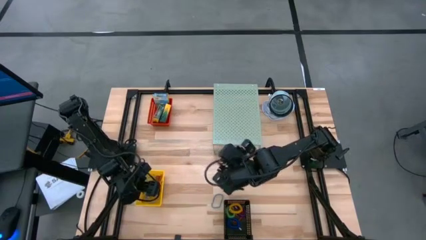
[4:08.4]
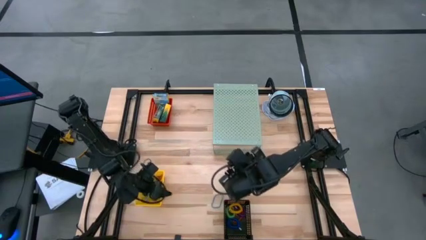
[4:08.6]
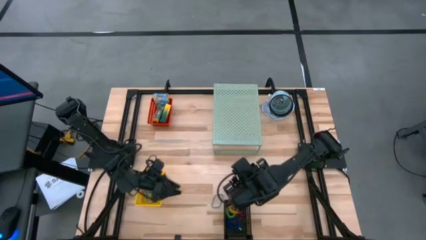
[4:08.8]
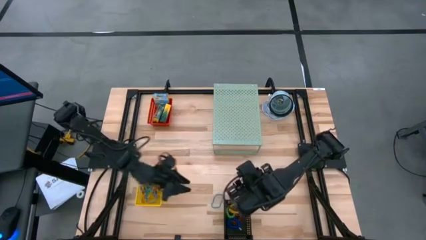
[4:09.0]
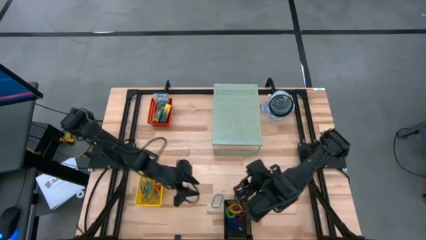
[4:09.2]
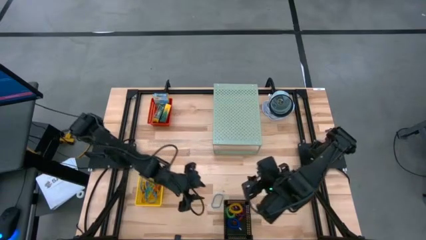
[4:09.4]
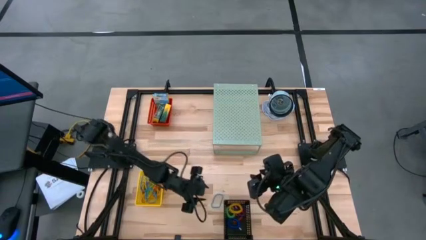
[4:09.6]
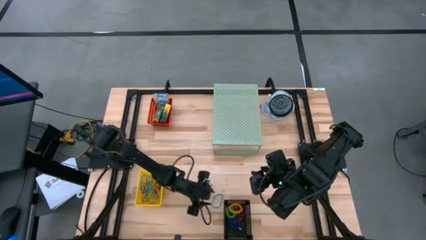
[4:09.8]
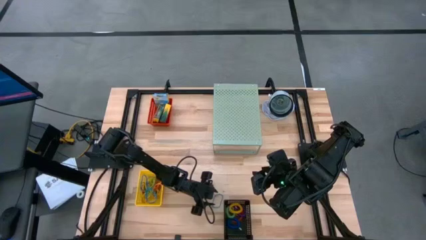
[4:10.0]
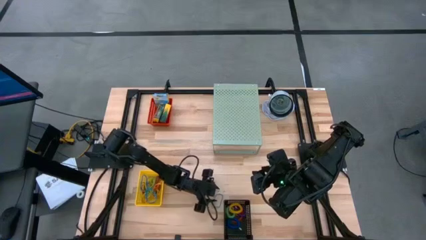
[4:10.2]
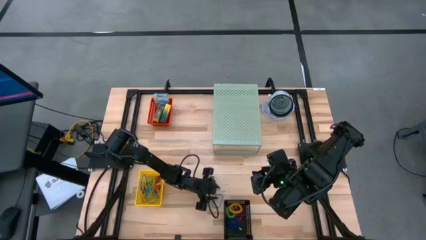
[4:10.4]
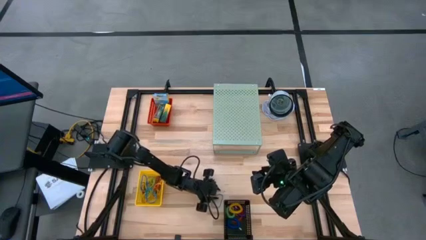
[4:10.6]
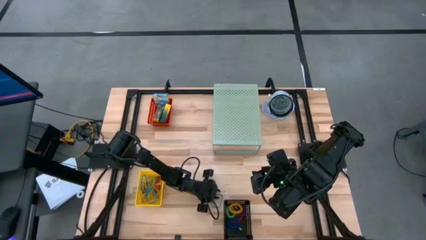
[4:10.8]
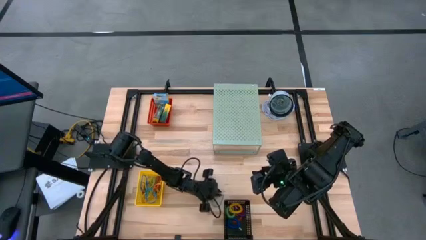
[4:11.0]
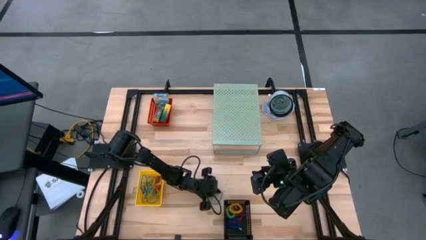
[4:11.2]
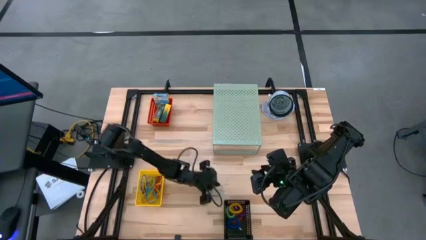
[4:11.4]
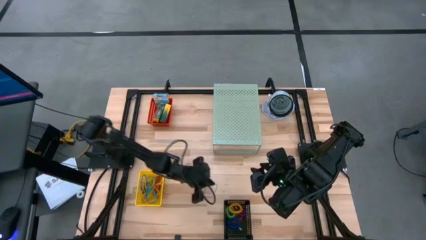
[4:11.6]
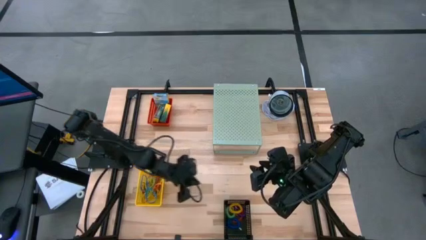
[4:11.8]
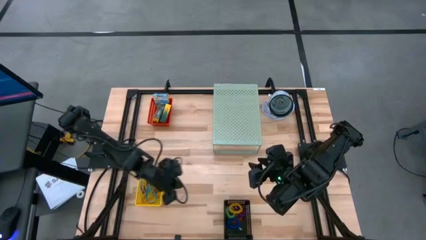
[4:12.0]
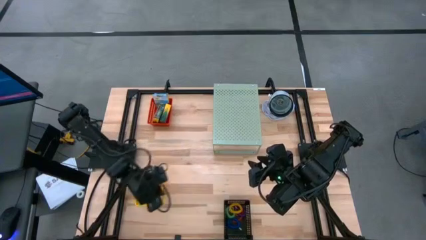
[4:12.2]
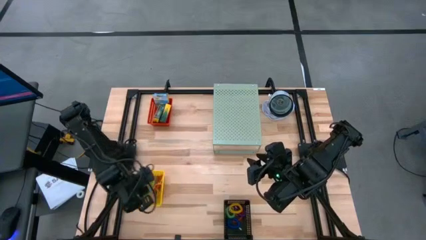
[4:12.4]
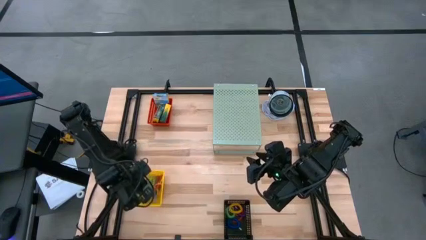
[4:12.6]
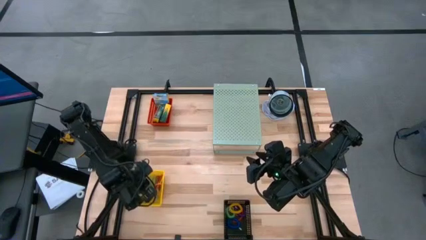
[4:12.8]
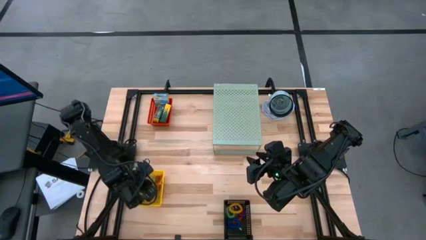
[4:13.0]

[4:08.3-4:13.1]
Task: Pick & Place Office Desk Supplies
Put the blue rubber band into the yellow bin

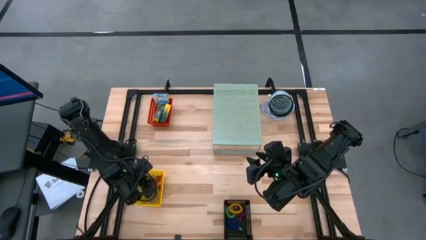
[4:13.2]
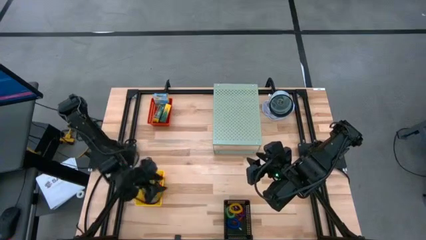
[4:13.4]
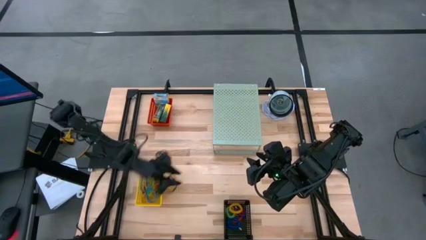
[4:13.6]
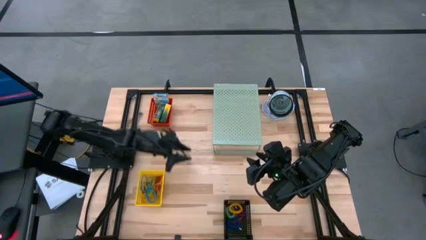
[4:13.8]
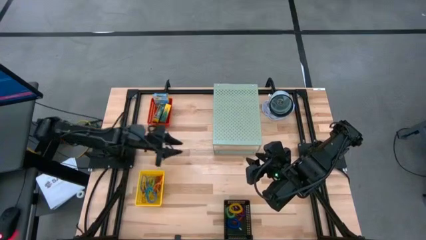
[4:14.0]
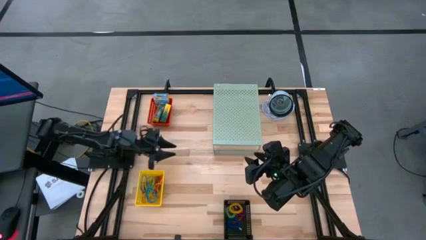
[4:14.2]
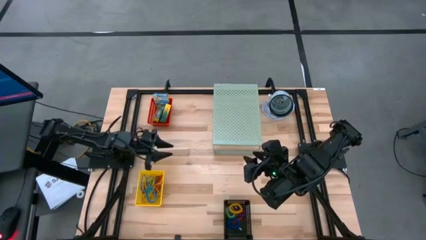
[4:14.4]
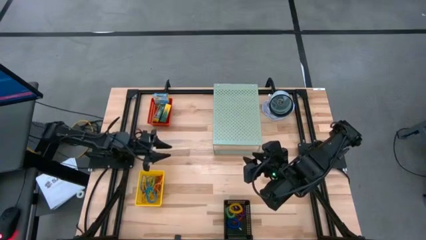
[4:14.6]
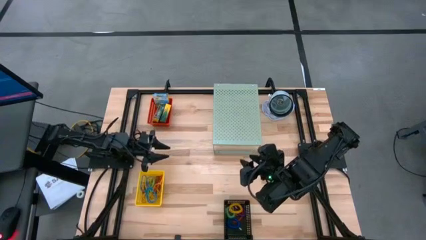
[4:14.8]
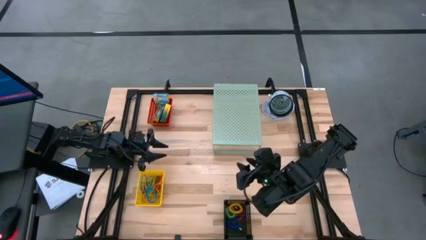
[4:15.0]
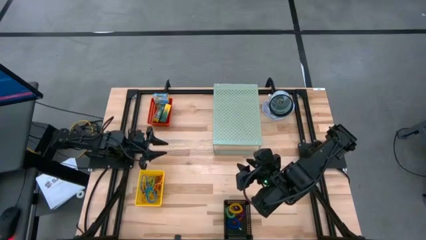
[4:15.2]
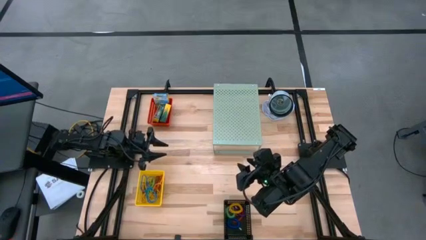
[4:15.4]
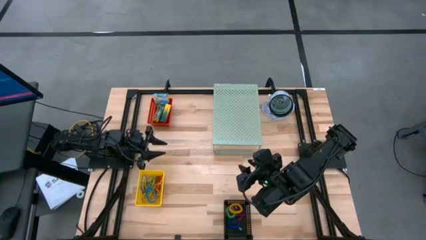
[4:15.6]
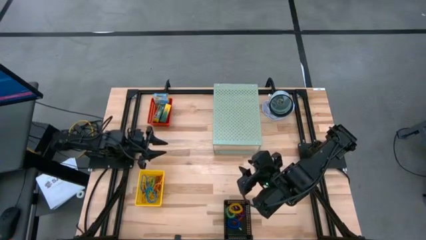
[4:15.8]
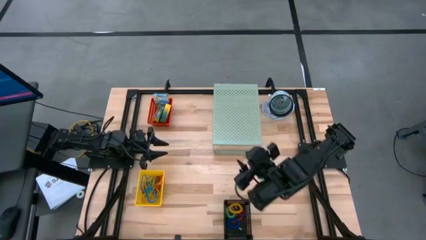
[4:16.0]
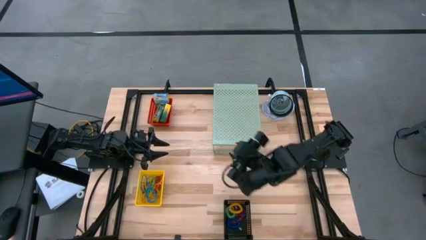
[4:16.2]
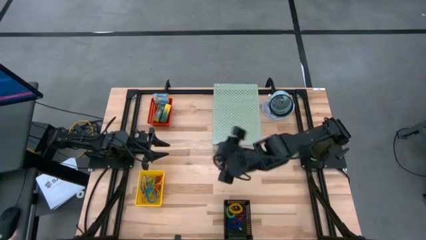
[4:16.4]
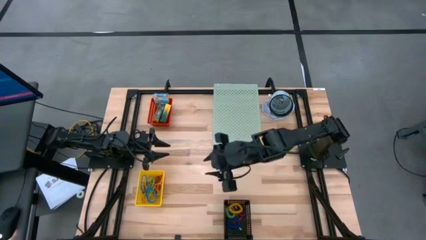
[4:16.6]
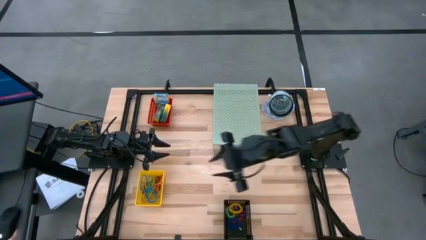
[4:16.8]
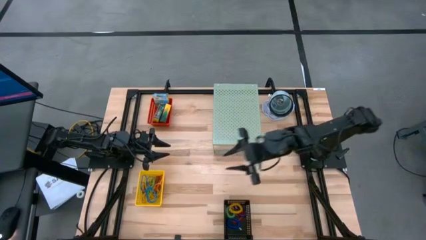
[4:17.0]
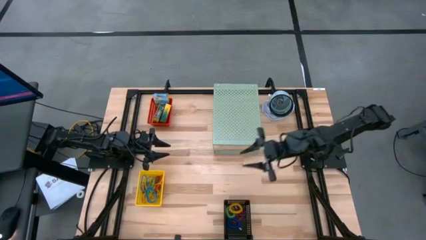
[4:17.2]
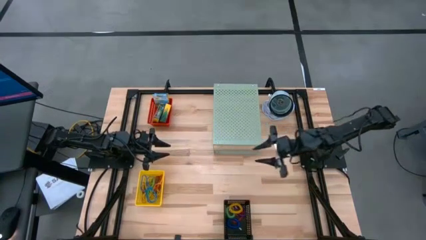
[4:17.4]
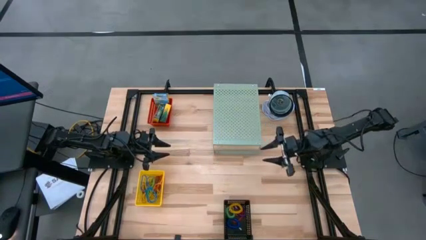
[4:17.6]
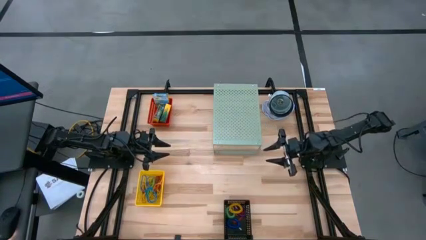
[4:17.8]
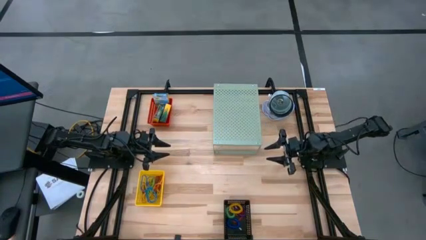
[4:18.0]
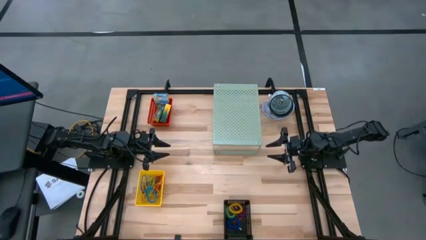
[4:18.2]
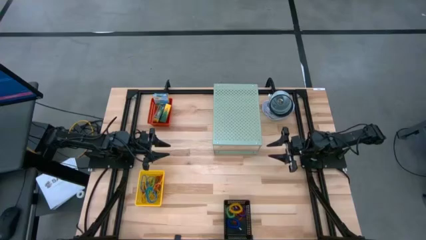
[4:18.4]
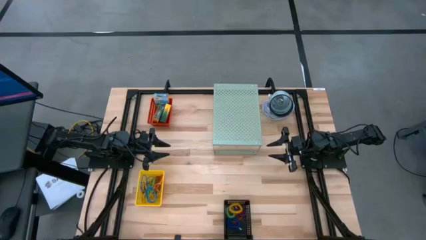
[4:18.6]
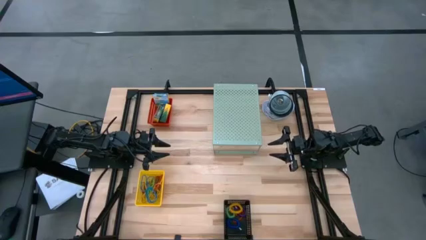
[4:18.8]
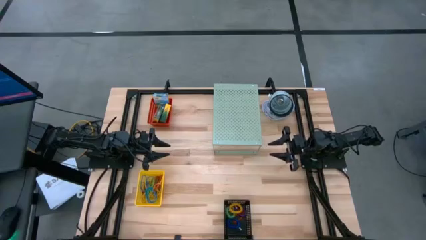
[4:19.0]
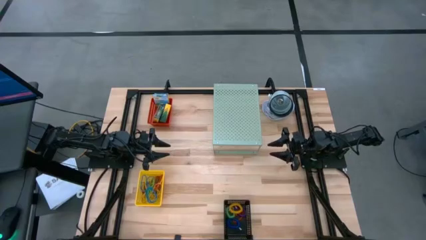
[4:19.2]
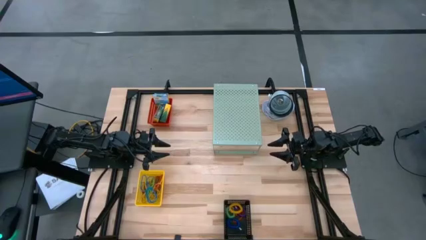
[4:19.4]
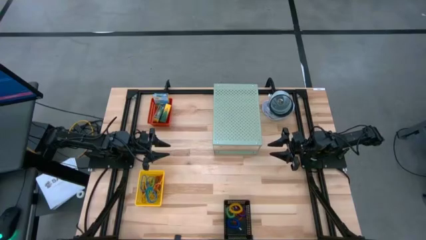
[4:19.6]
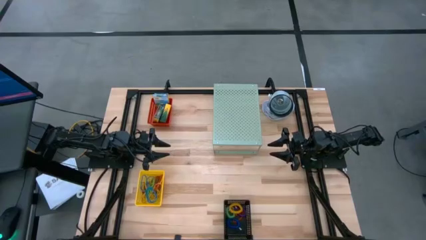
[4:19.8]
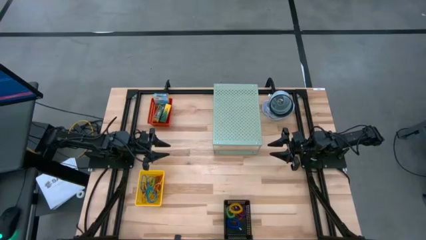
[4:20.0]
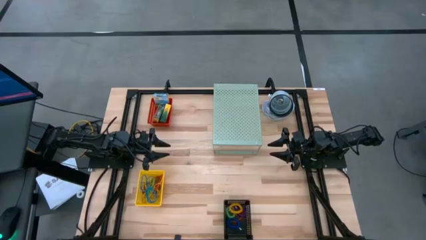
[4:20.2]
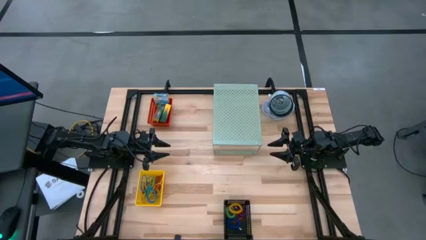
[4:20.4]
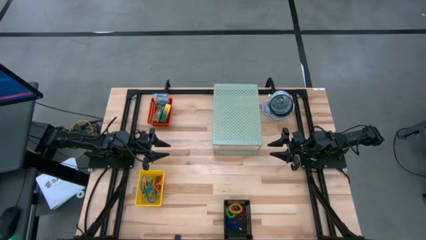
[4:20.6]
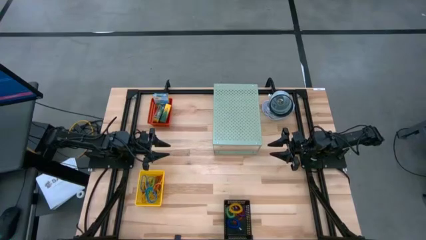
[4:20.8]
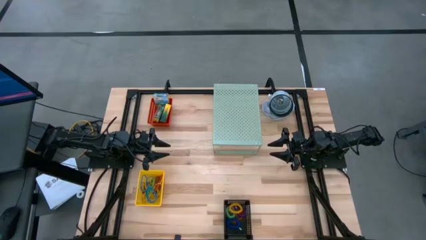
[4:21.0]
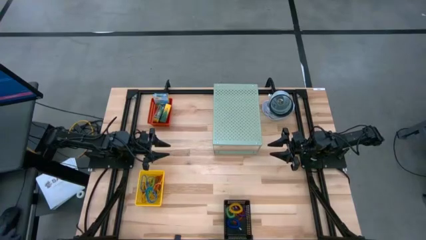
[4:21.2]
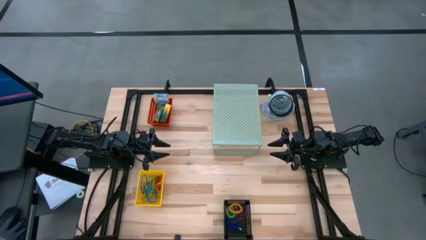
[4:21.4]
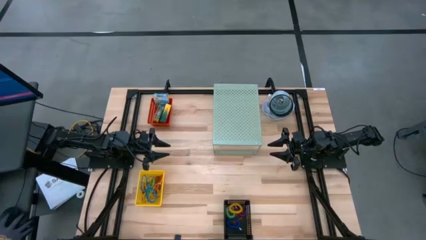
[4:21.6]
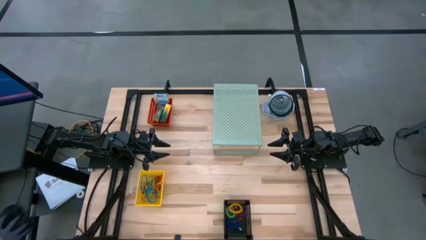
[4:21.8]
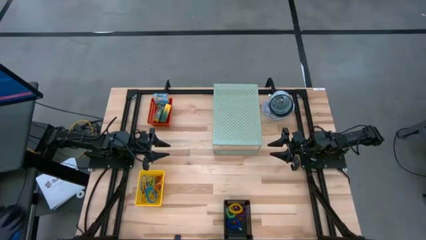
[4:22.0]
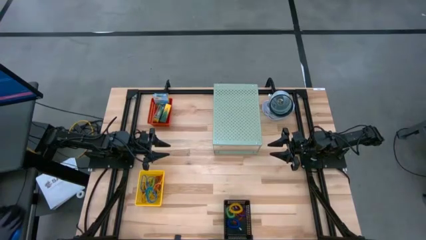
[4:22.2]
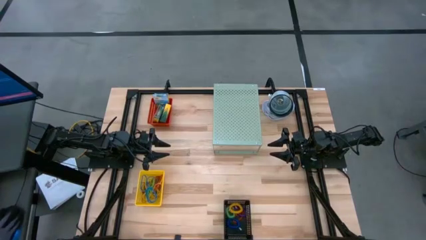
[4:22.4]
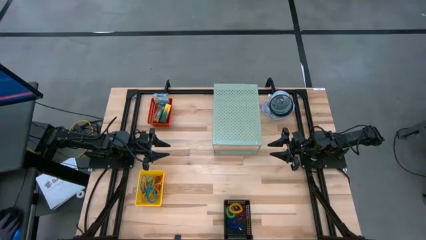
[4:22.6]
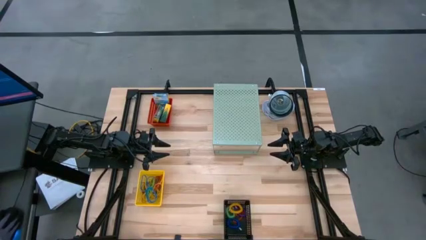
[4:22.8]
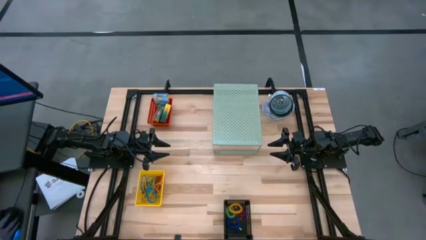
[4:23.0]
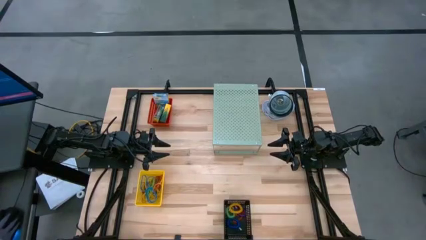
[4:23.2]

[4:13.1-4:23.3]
Return to Home Position
